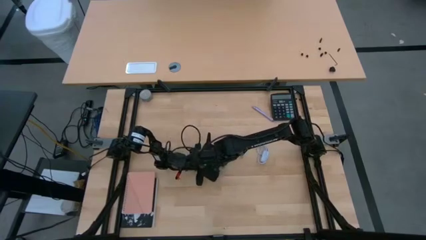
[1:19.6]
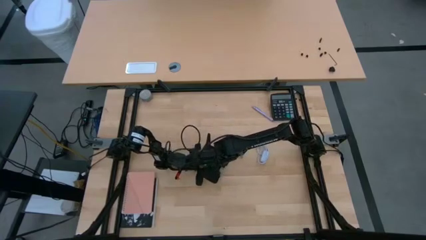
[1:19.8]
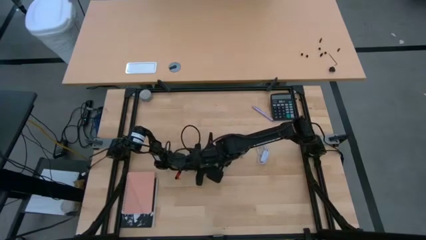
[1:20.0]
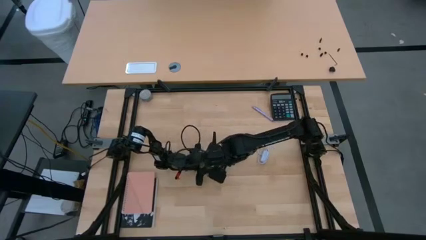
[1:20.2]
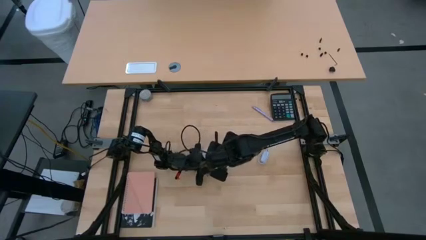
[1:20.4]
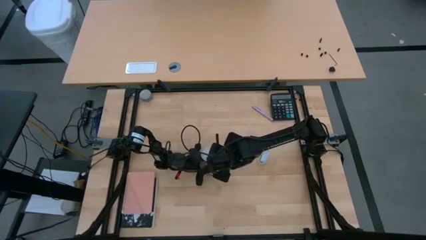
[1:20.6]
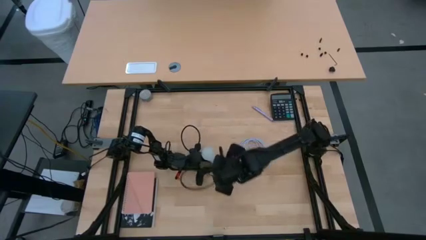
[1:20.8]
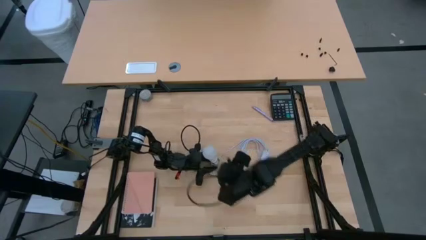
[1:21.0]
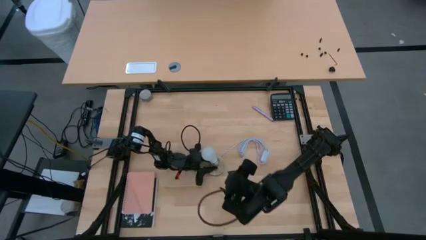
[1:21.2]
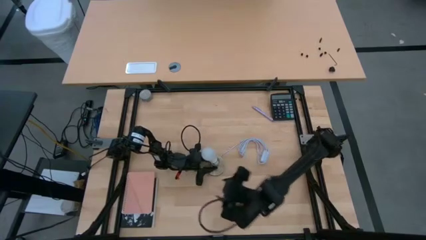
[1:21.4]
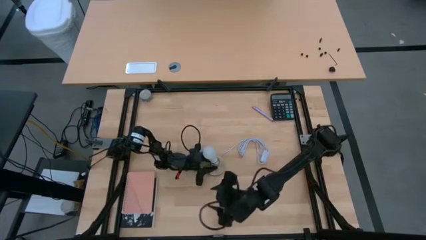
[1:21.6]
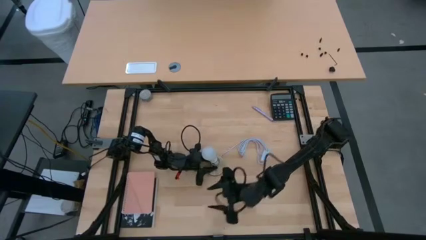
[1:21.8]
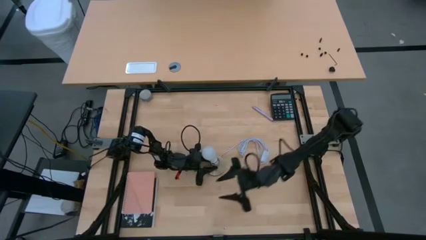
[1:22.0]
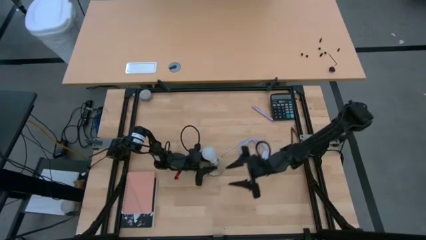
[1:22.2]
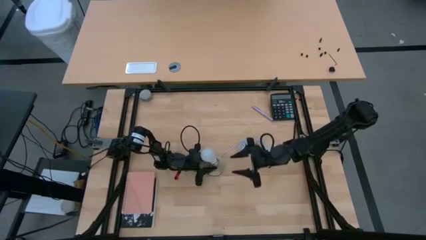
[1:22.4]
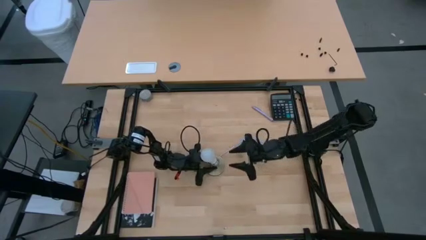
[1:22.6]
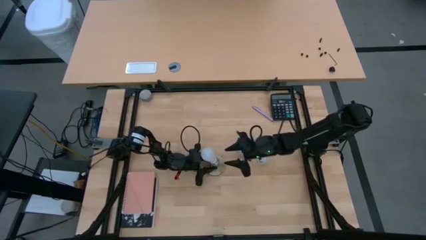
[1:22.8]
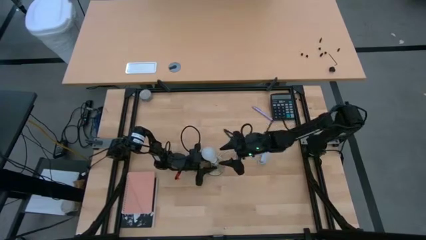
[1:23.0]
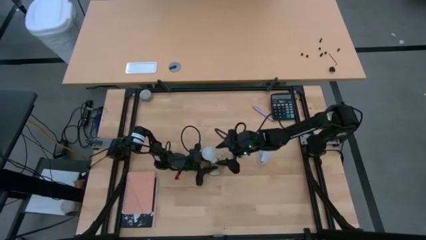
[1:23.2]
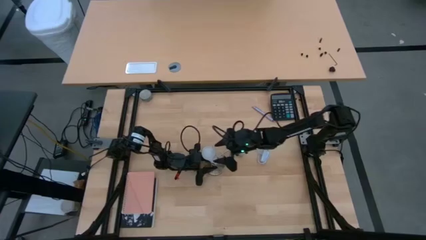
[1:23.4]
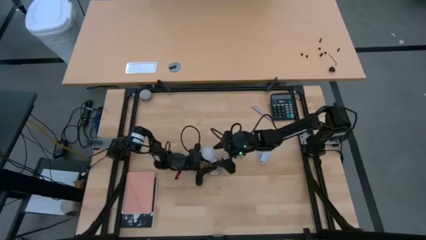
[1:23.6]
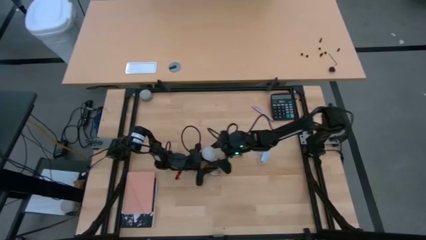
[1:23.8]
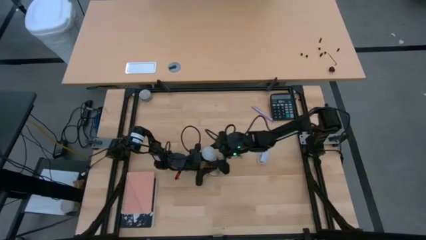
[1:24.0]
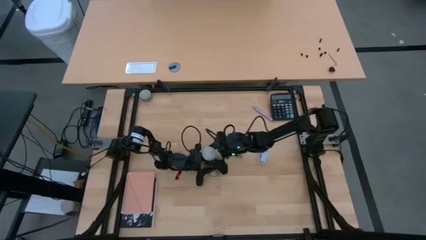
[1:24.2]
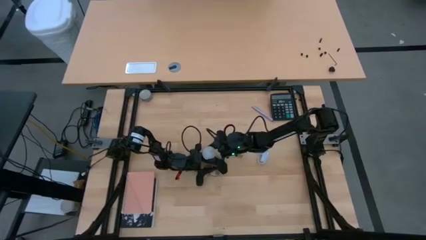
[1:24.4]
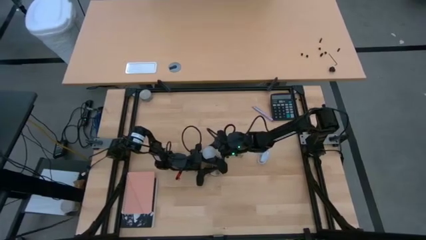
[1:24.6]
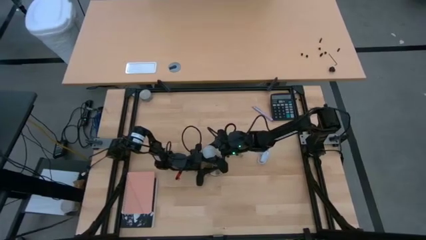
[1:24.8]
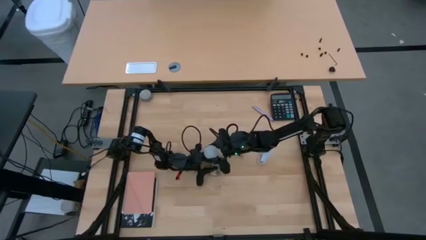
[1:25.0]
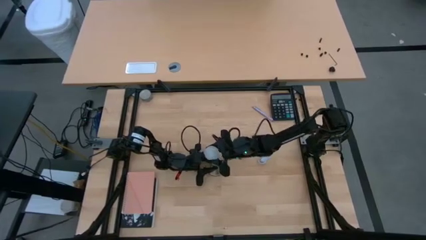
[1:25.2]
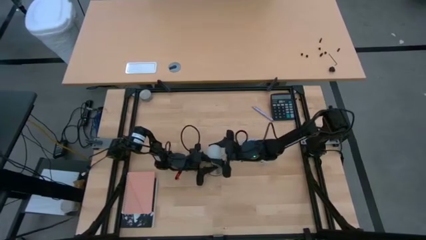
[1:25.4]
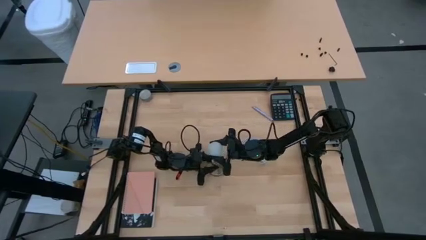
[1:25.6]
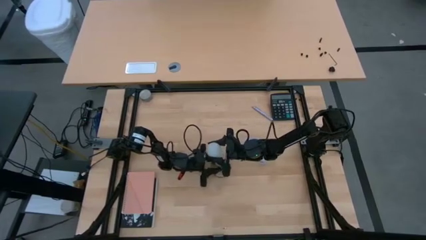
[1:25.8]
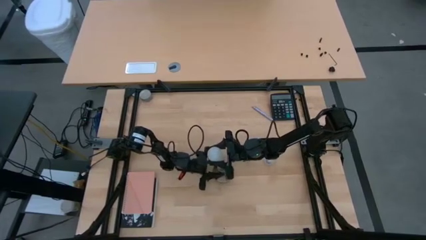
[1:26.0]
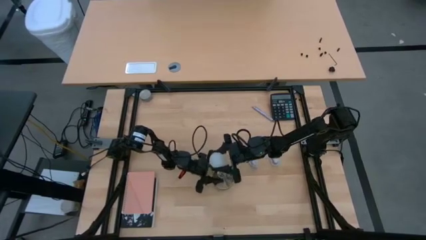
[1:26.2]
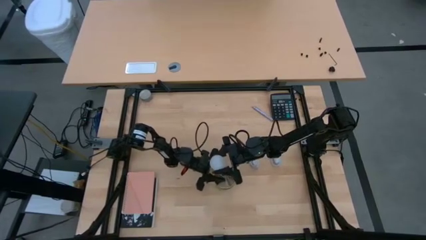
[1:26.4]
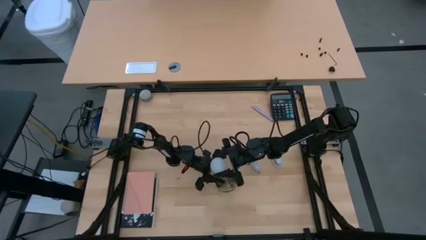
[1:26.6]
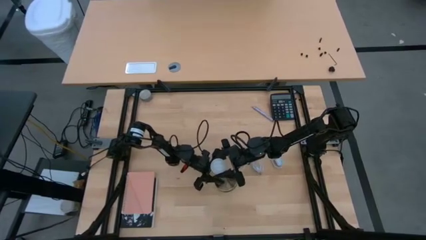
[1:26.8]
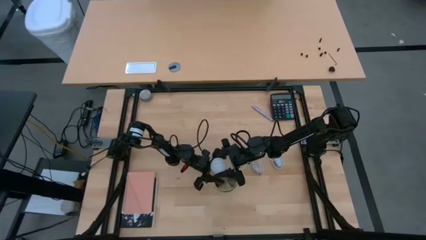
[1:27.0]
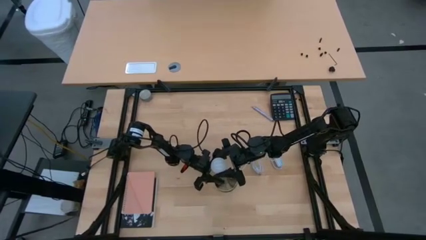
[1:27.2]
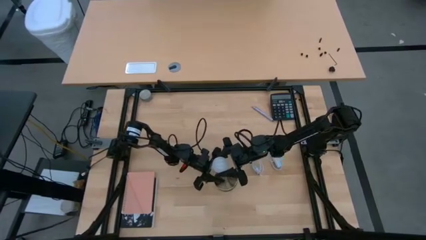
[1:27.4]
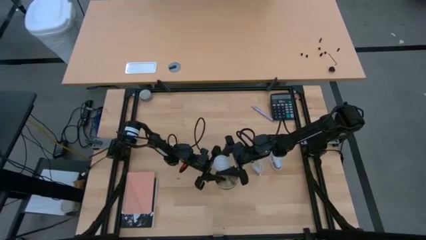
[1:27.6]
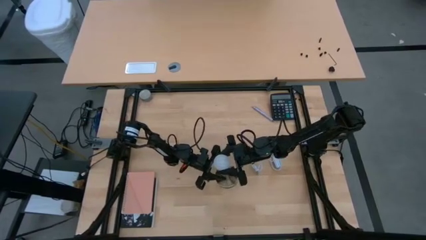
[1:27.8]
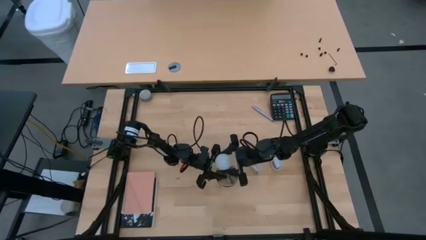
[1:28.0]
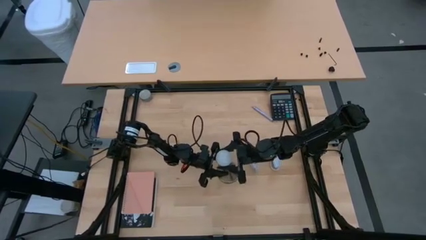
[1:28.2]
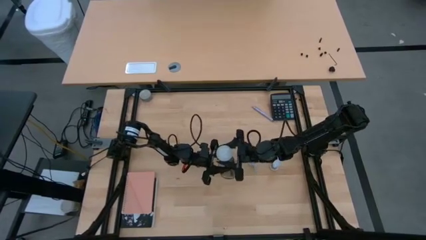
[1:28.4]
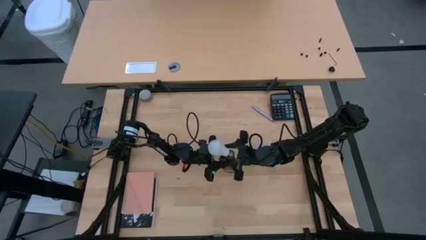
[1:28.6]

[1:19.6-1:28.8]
Task: Screw lightbulb
Insert the lightbulb on the lamp
